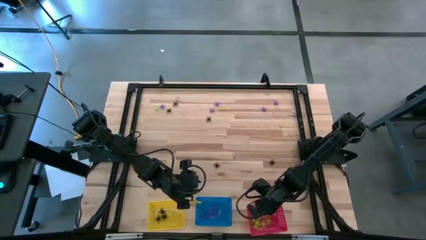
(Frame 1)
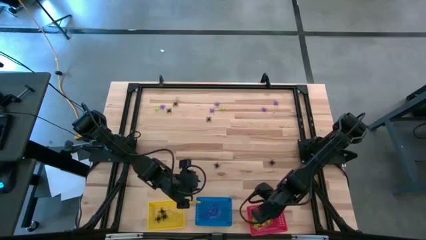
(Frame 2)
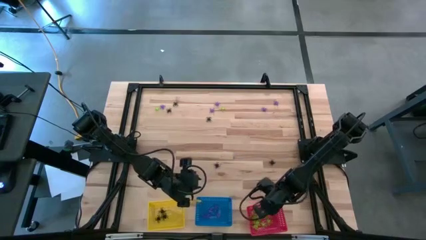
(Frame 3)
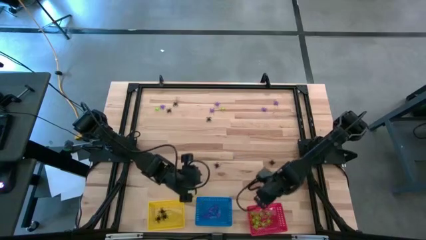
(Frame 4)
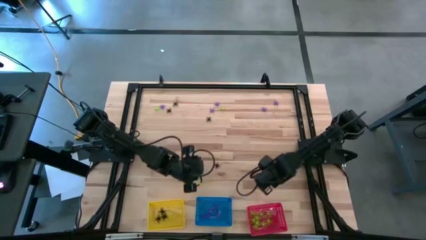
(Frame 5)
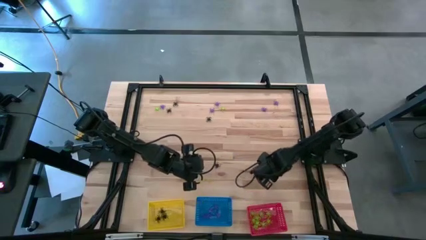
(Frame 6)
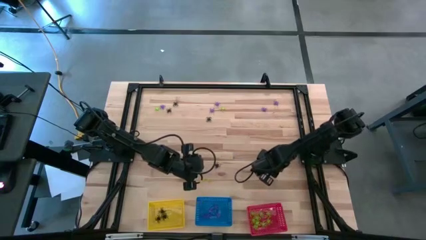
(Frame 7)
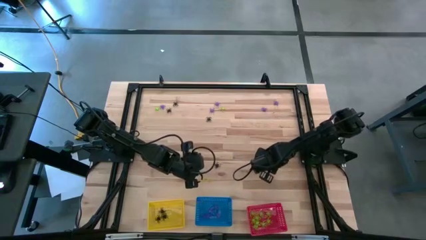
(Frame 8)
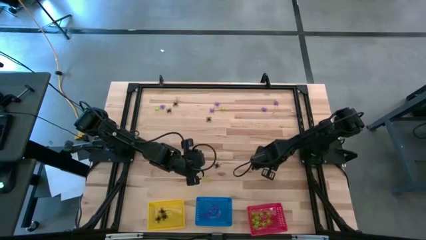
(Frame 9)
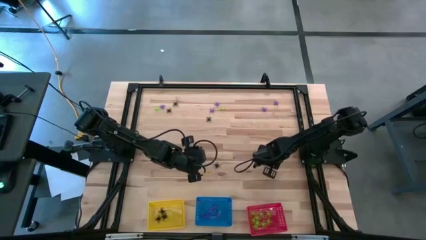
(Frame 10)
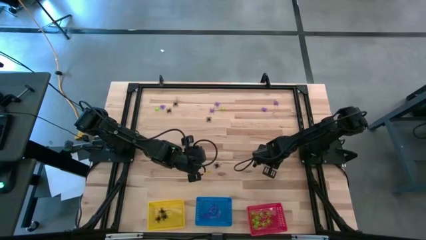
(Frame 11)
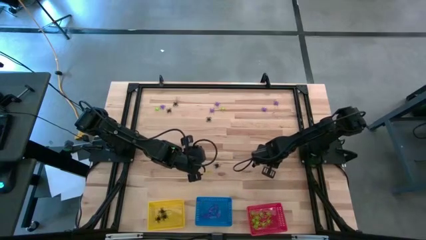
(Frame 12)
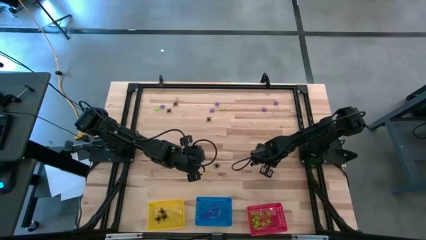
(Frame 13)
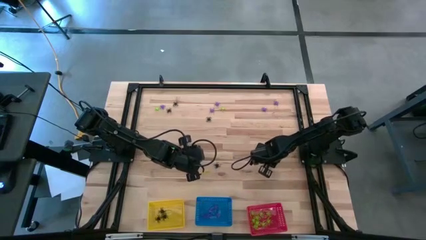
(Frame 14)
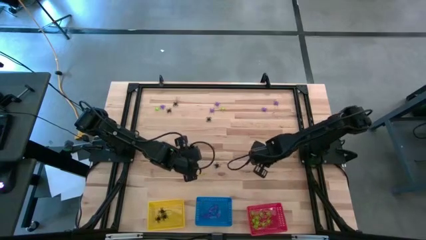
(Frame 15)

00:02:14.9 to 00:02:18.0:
Task: Sort Halloween decoration
Put the black spider toy into the yellow bin

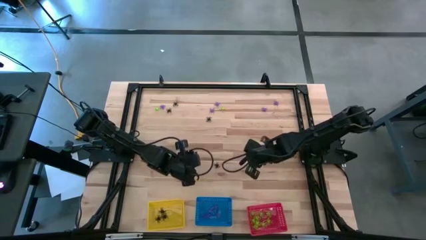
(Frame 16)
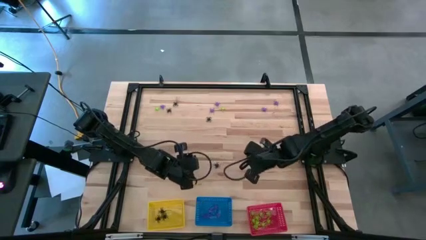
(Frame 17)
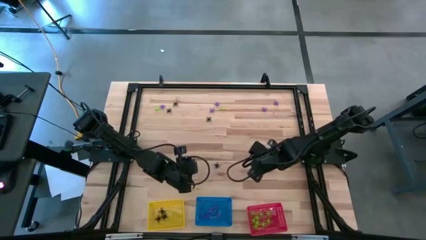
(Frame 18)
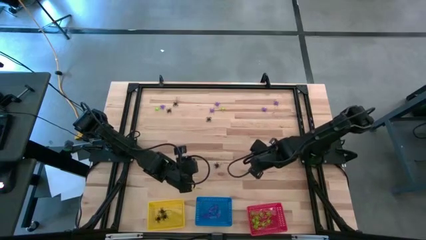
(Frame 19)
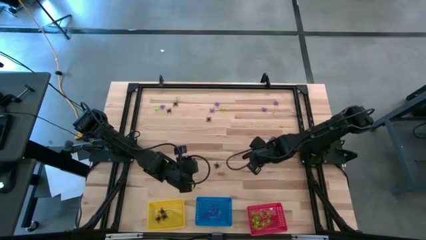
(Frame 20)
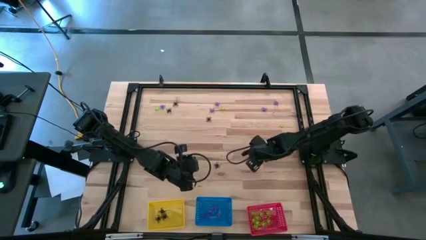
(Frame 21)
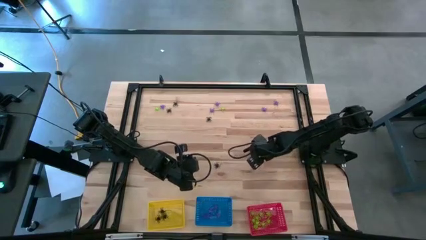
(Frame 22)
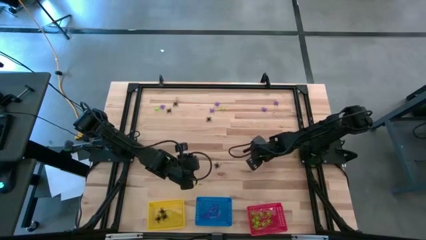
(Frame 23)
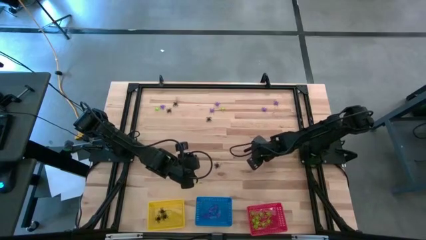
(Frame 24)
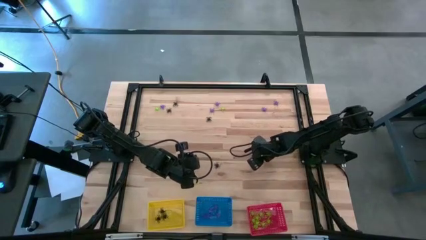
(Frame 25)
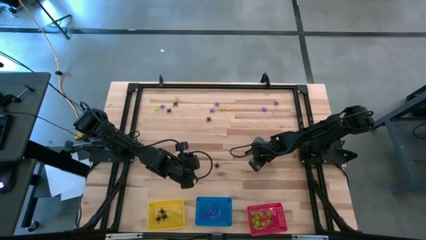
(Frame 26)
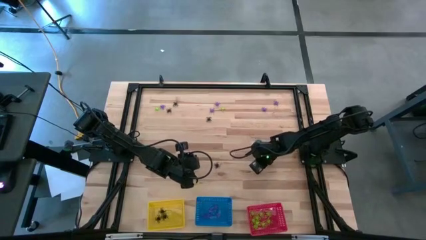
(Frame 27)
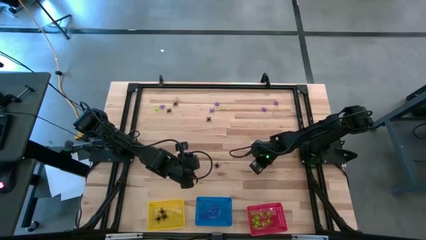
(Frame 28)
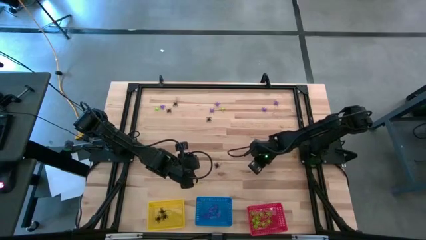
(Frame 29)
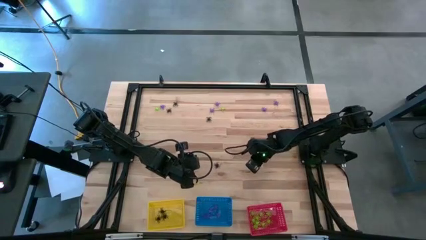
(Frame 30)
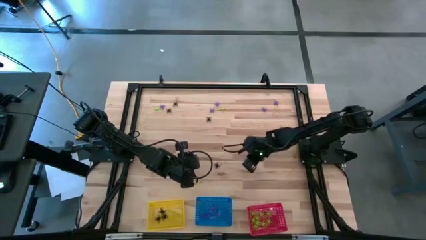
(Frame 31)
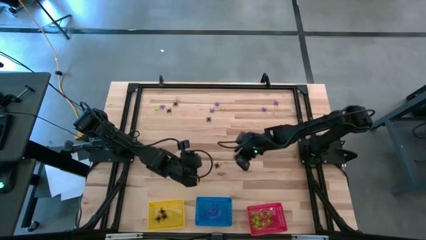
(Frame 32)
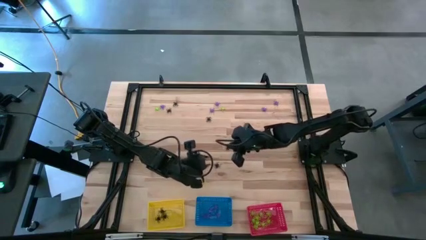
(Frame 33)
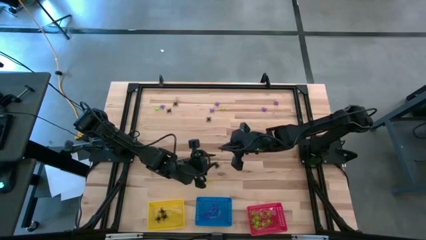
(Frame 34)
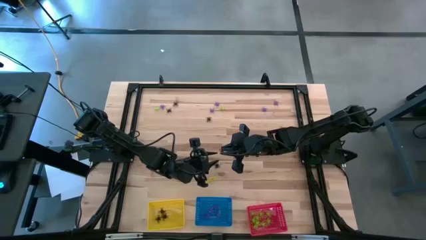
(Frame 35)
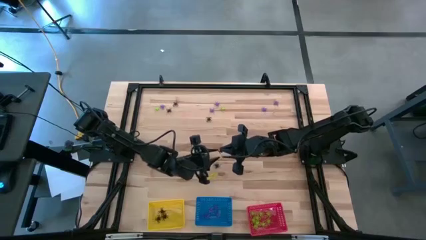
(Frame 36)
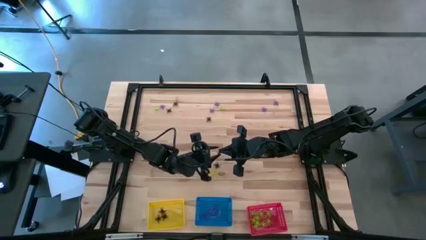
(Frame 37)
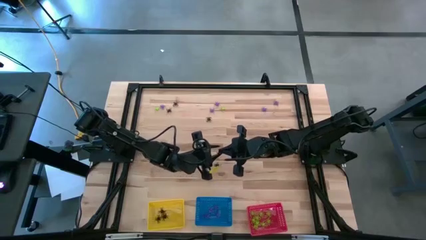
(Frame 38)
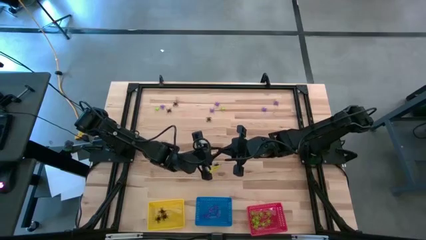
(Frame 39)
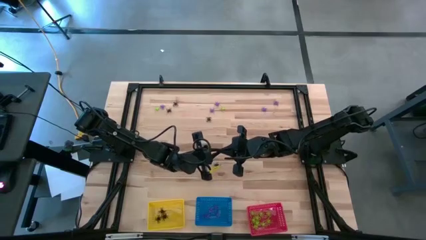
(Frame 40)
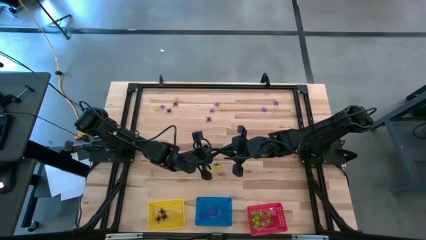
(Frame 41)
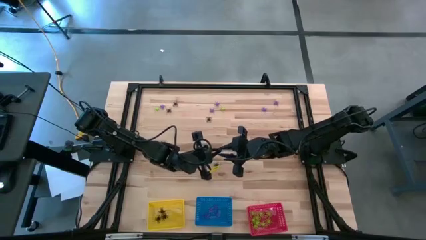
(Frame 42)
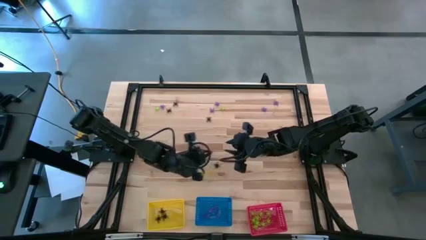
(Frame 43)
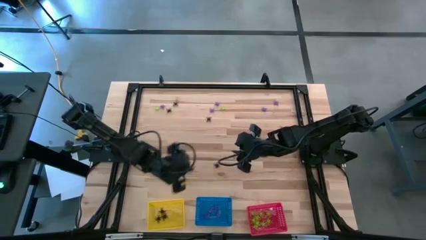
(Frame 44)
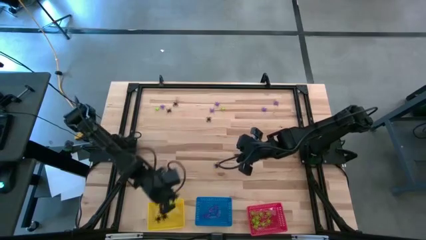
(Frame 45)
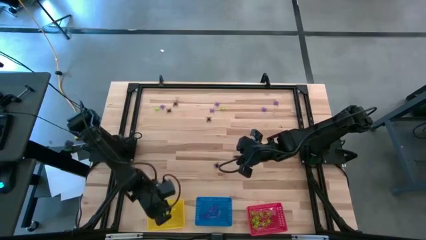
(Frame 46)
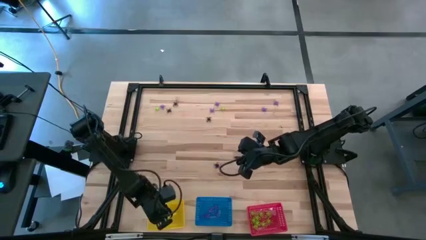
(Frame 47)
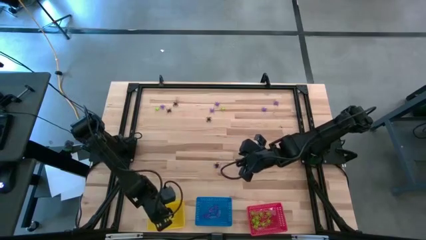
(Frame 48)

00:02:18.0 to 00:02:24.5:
Put the black spider toy into the yellow bin

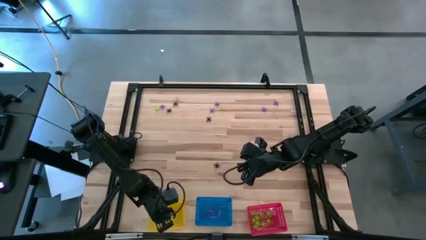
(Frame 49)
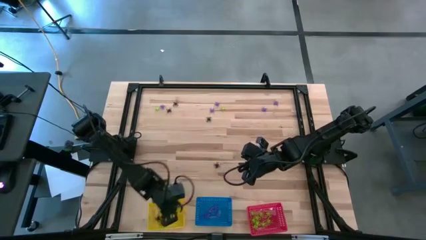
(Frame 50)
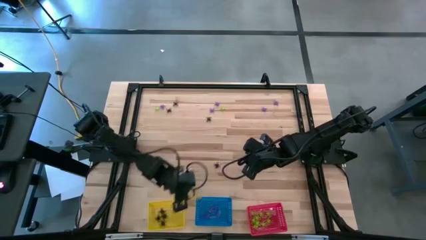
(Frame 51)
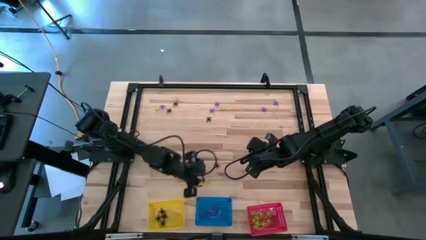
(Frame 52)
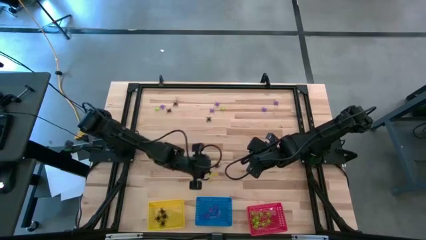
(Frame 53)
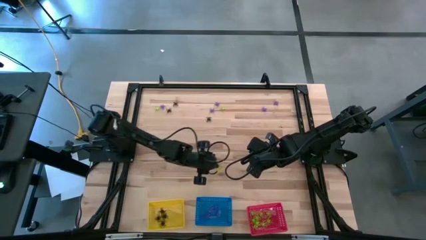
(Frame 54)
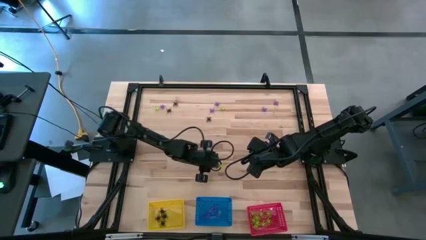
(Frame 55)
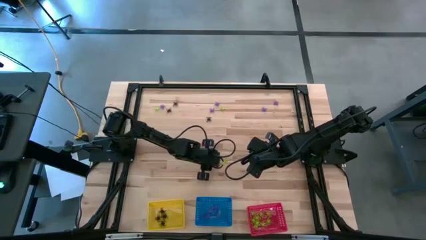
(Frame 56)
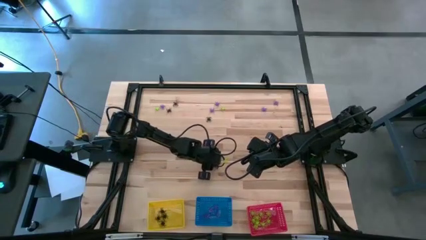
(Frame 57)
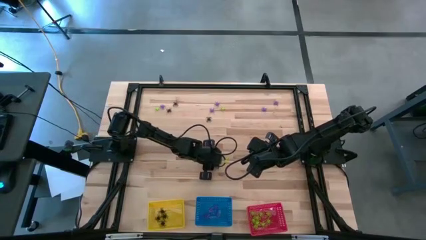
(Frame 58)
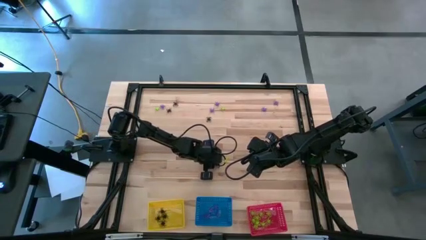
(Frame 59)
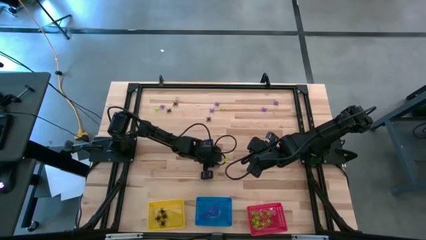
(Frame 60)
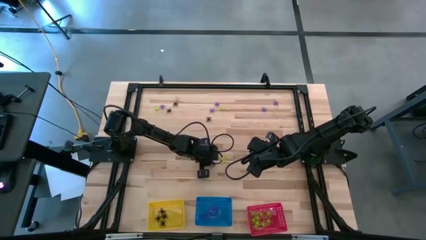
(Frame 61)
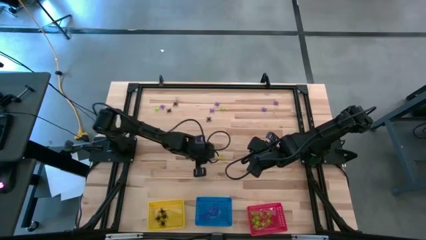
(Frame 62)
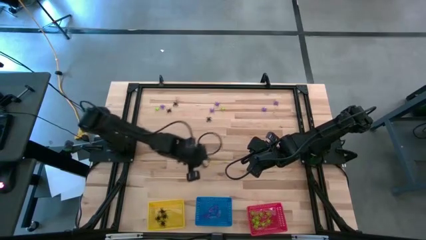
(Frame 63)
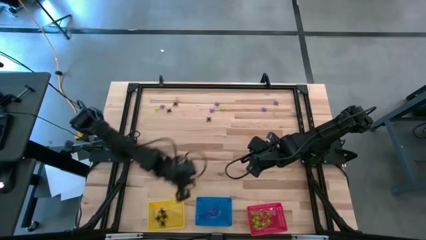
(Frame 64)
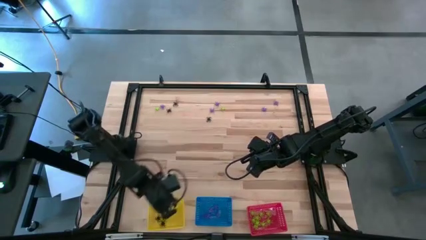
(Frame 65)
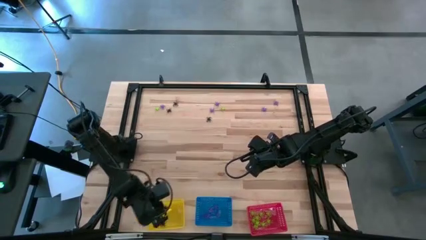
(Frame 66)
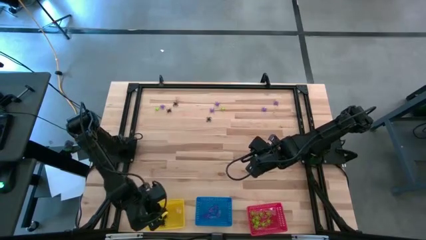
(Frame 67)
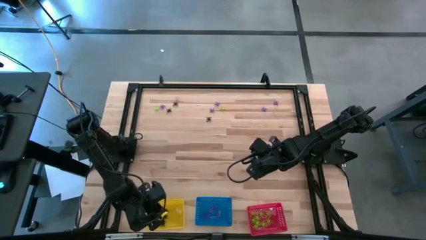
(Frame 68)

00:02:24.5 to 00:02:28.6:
Put the black spider toy into the yellow bin

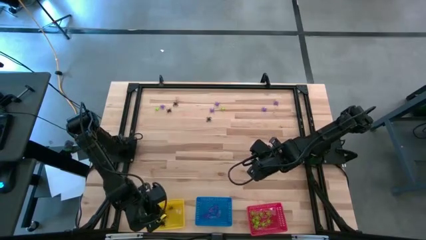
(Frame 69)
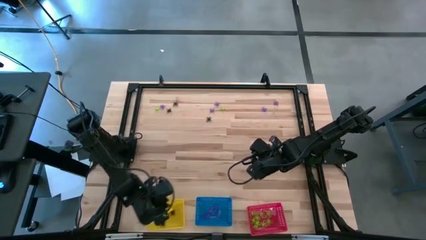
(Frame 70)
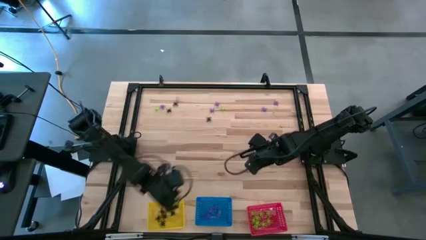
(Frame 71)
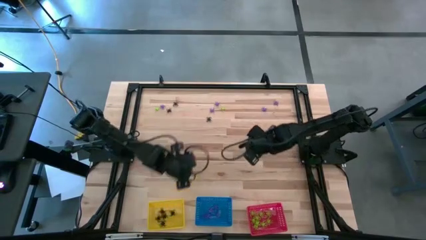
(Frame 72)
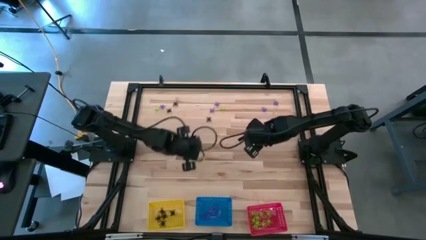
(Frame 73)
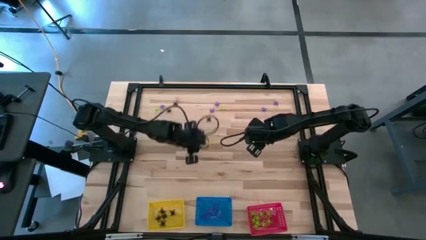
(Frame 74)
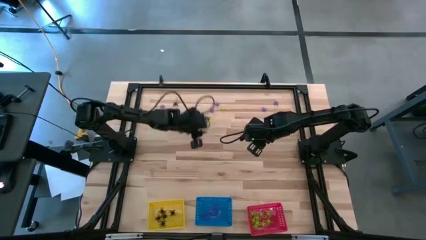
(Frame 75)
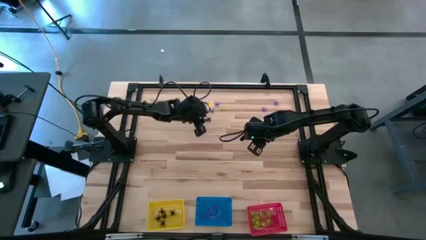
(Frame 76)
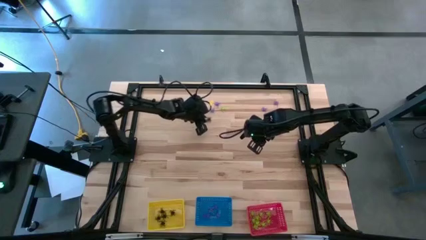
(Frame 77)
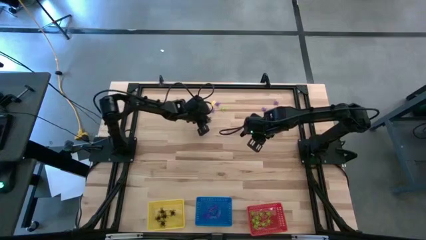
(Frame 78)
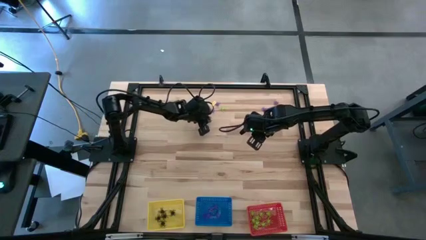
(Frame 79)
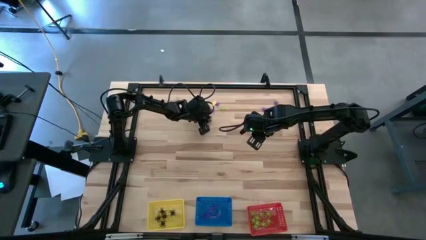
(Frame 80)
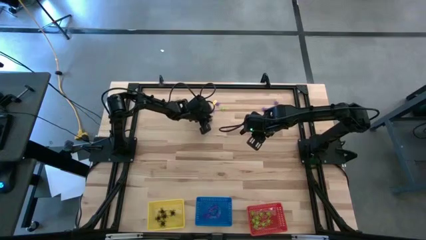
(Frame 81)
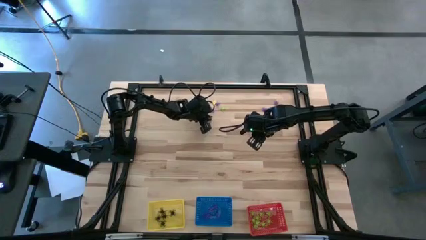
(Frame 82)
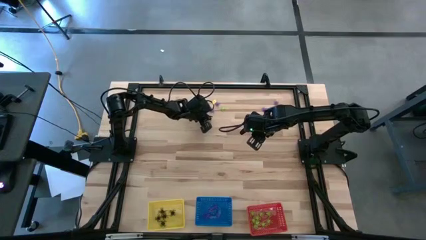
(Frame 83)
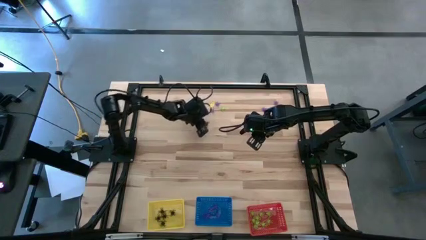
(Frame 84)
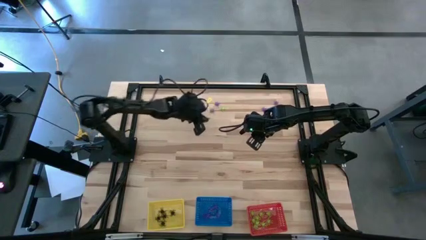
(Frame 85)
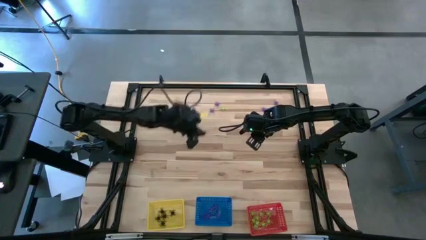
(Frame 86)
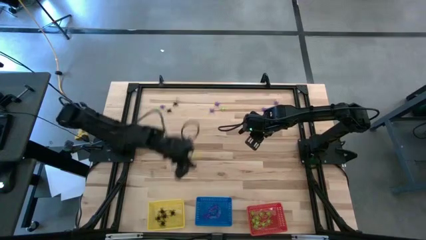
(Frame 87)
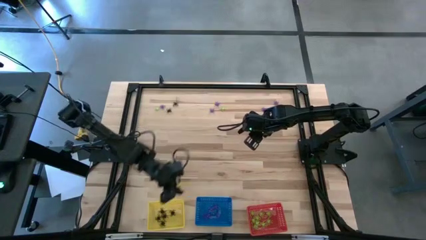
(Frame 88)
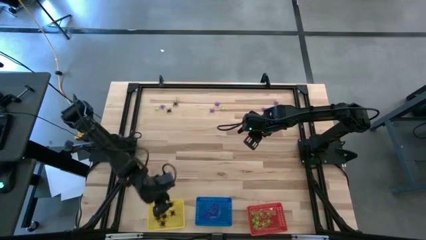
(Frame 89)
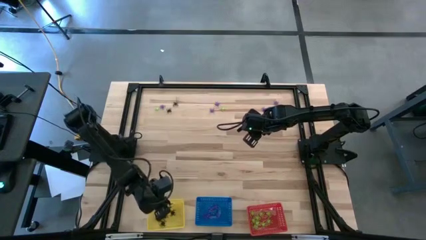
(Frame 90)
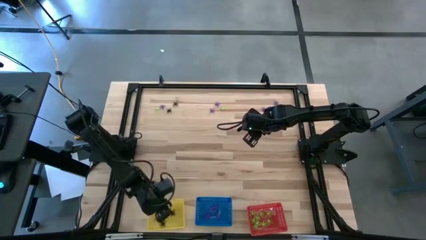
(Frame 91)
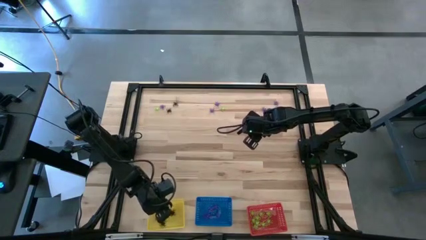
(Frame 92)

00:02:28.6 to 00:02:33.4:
Put the black spider toy into the yellow bin
